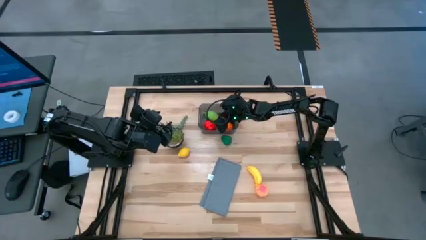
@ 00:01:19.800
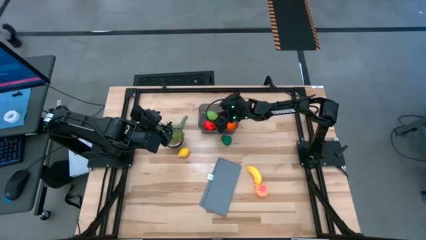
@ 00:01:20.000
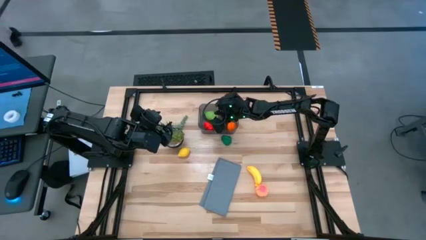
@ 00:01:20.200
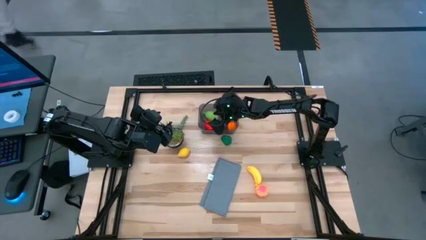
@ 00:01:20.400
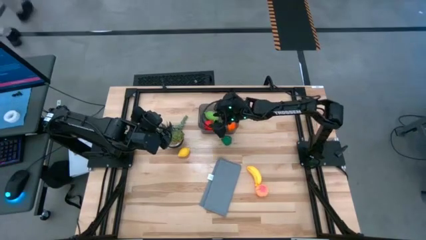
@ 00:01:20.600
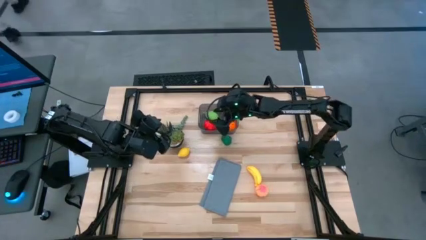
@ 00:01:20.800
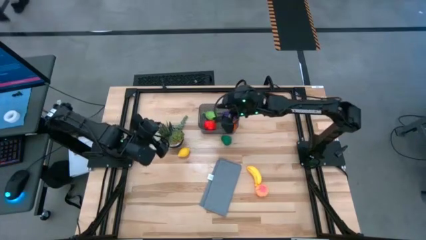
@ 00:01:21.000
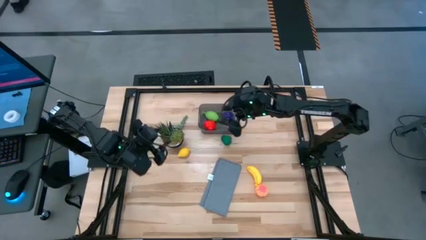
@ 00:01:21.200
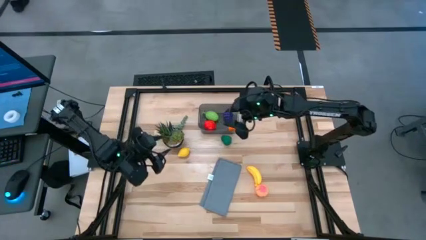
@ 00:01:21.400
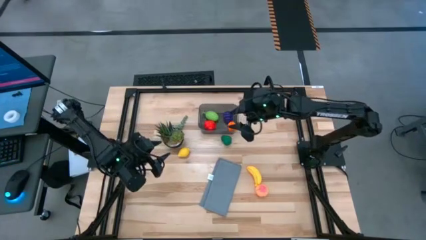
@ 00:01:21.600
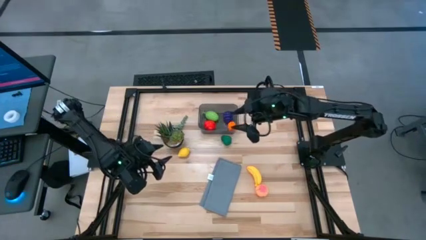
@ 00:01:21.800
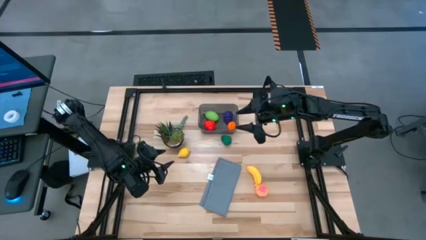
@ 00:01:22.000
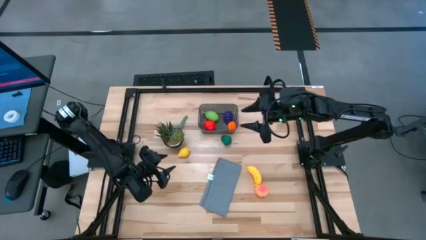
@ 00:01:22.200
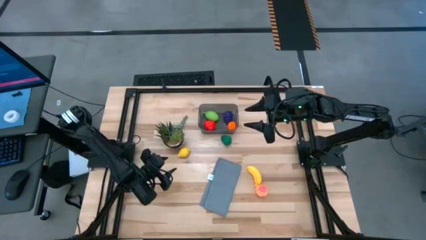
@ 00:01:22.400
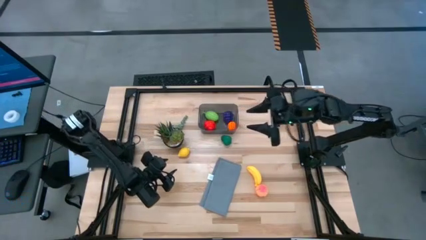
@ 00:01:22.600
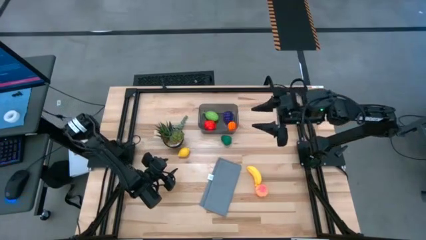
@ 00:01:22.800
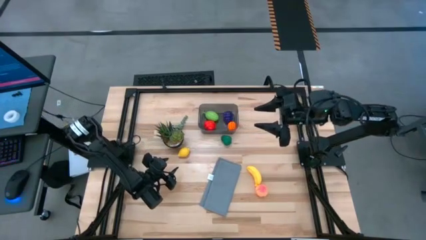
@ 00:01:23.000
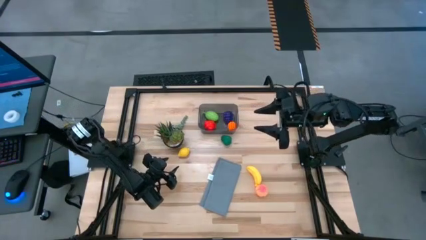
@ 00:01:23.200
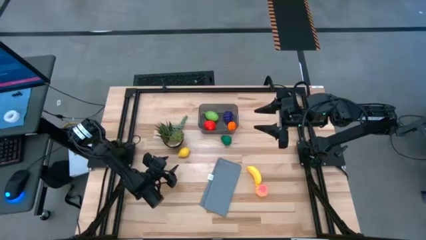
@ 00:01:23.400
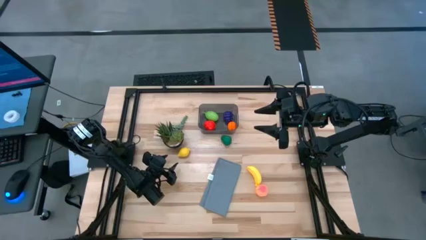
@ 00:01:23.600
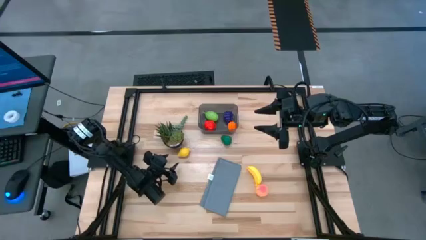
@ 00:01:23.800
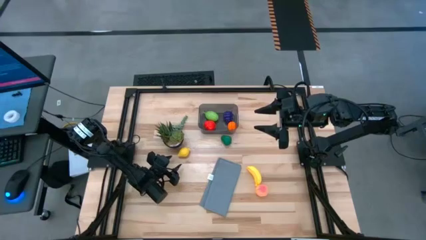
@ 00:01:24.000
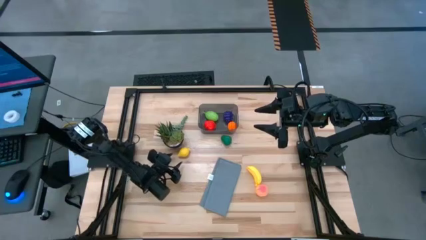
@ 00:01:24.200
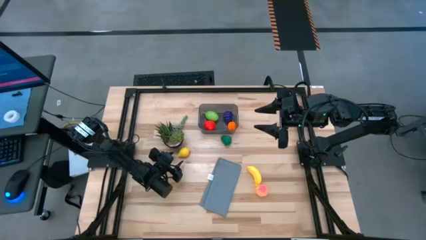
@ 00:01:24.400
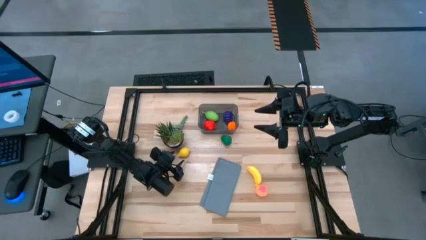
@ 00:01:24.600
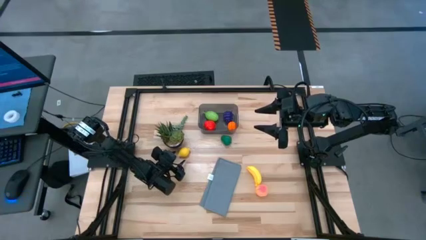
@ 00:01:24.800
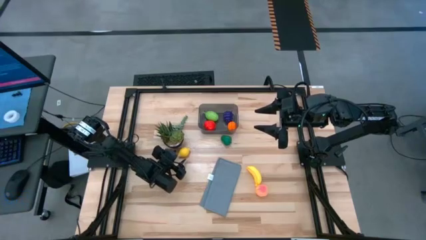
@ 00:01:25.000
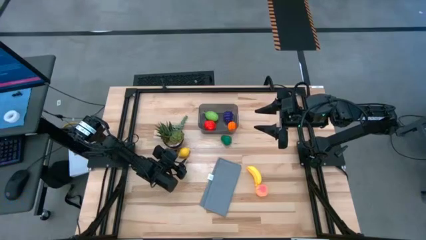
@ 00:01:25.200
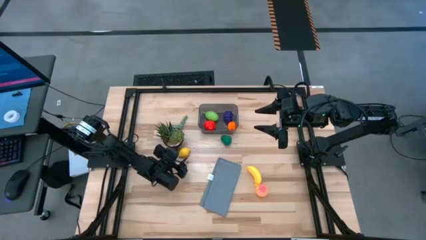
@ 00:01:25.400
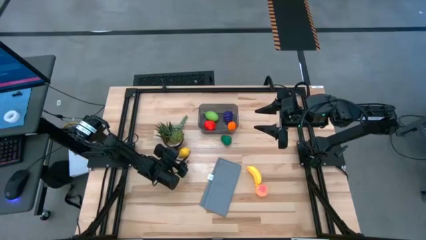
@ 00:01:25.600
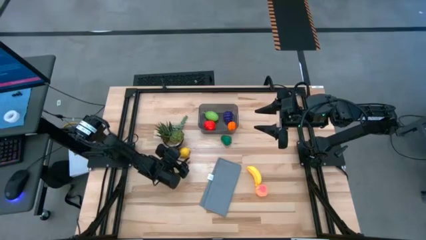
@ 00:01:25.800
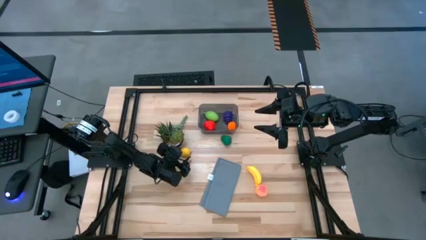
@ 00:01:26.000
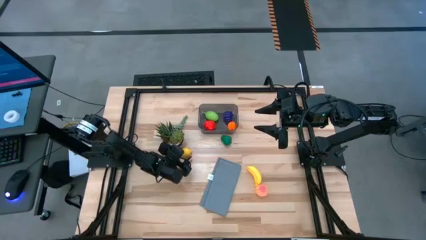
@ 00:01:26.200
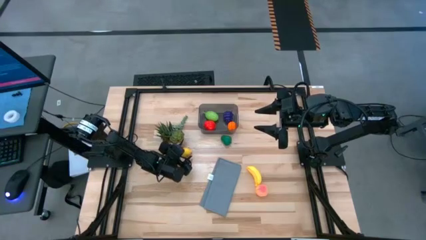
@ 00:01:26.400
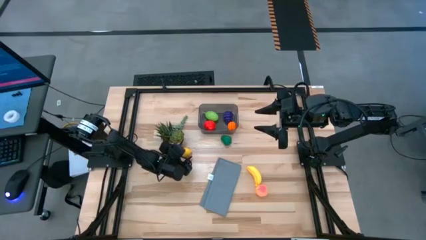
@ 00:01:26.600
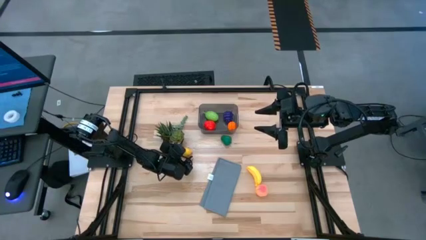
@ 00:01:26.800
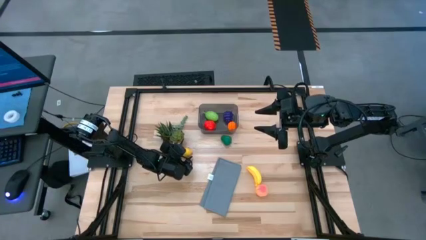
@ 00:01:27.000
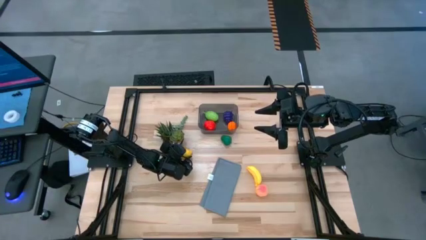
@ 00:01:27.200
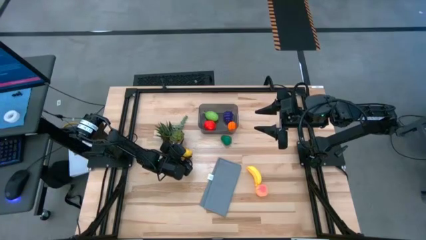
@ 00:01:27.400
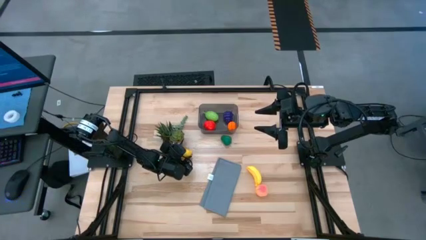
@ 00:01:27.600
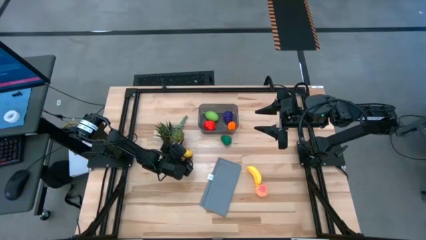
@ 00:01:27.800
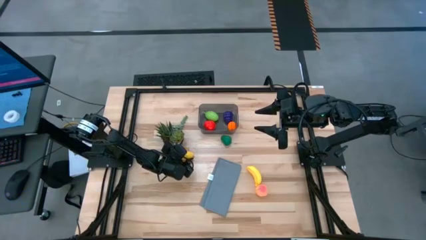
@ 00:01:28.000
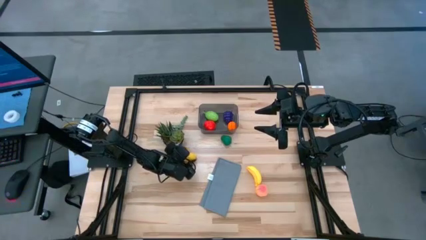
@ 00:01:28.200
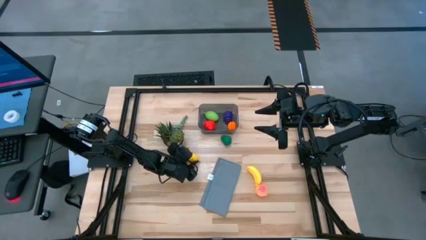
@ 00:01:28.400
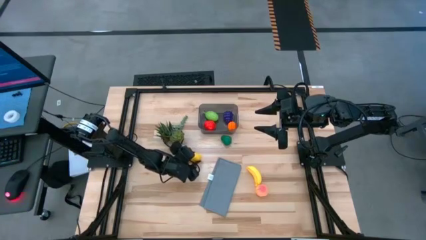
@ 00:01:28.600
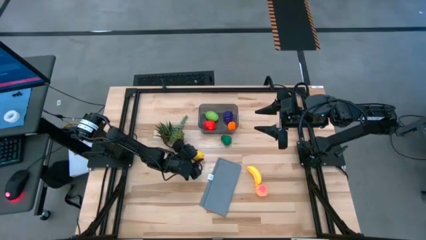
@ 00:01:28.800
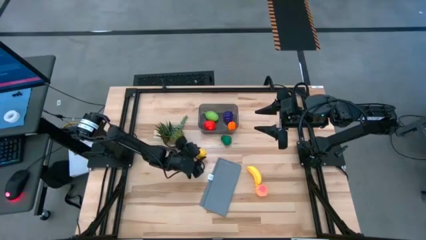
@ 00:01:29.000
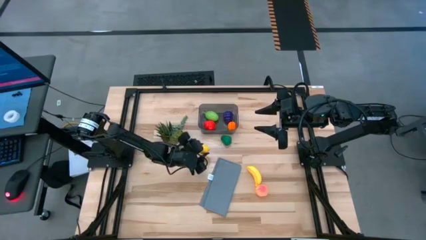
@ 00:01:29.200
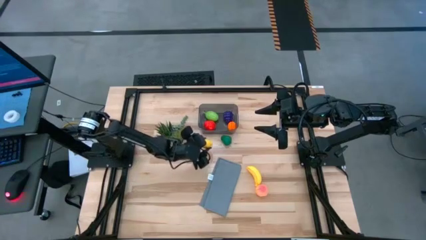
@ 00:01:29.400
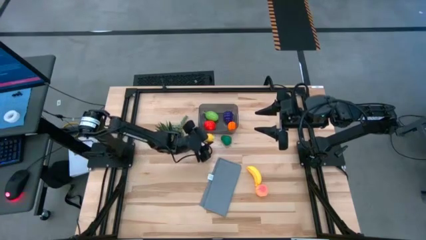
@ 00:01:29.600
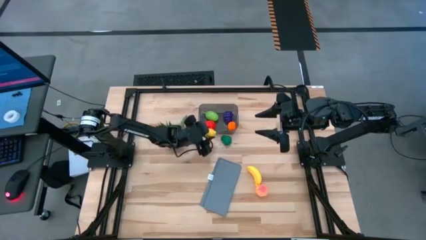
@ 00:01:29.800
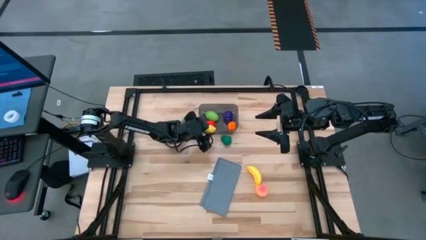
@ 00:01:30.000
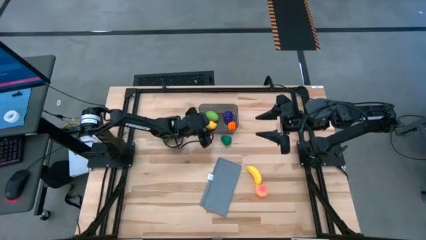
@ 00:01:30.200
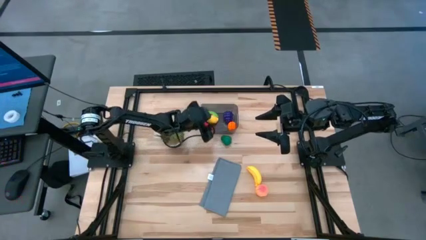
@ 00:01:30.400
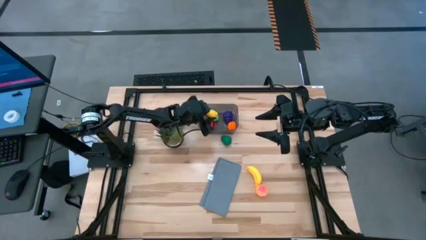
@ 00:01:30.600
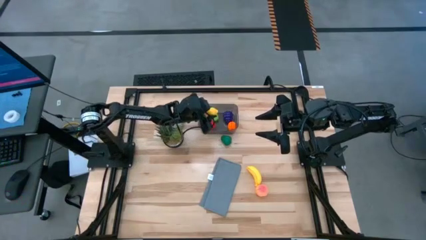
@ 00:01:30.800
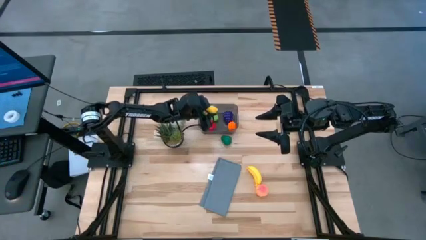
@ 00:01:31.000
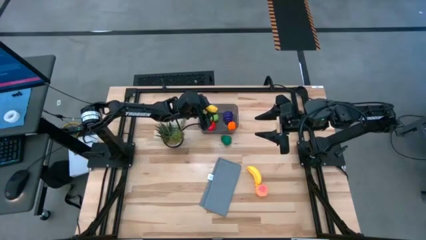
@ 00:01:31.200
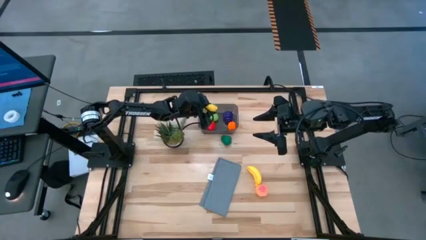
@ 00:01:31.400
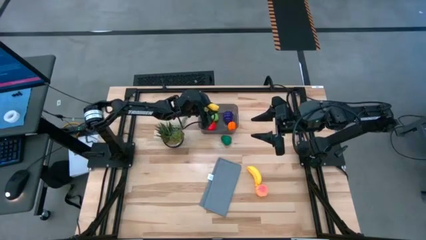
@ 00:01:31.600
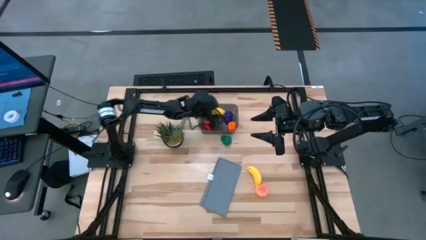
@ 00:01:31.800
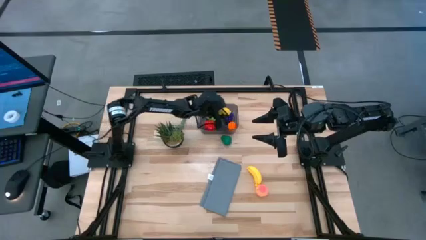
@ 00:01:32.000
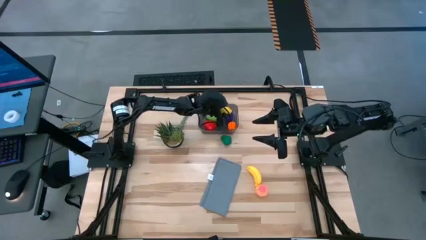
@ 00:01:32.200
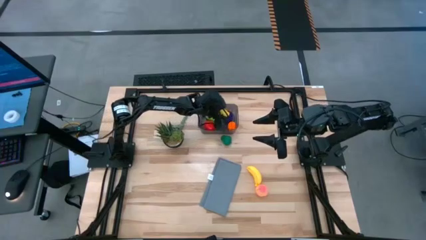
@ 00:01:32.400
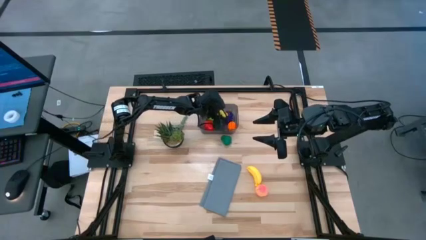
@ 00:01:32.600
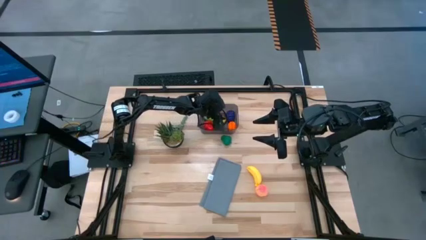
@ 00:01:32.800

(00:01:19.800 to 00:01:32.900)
Task: Pick and placing Produce into tupperware
Put the lemon into the black bin

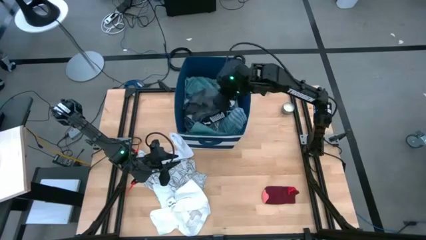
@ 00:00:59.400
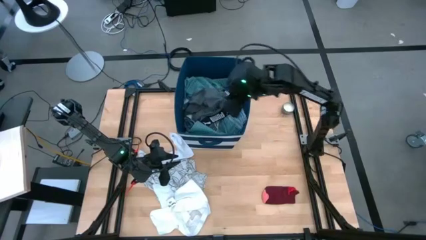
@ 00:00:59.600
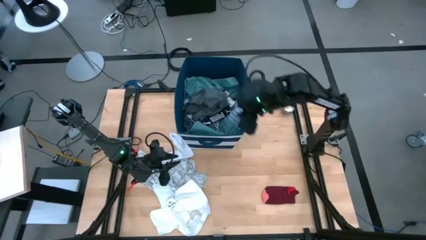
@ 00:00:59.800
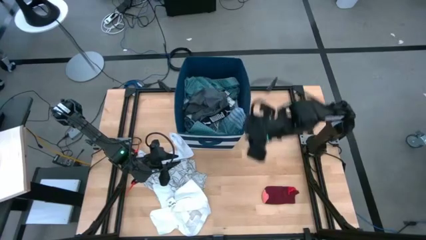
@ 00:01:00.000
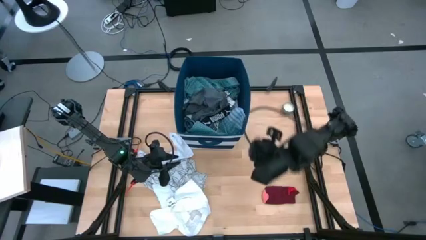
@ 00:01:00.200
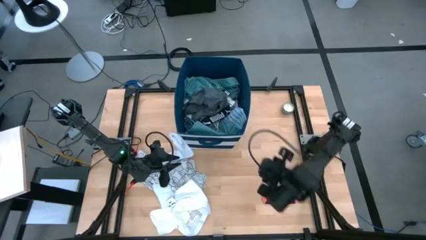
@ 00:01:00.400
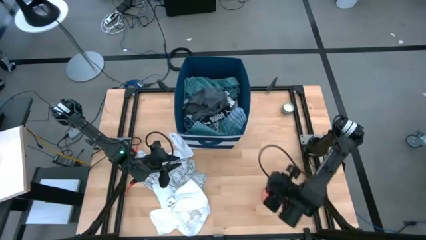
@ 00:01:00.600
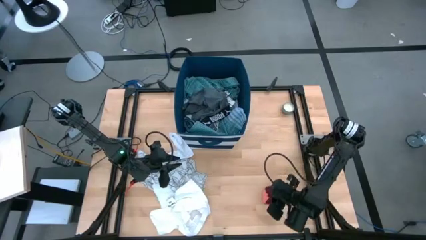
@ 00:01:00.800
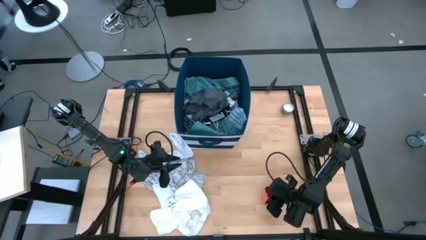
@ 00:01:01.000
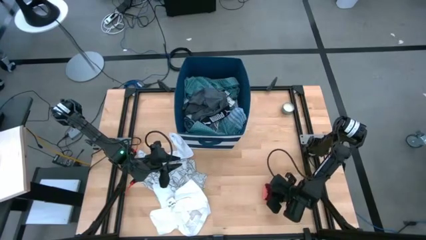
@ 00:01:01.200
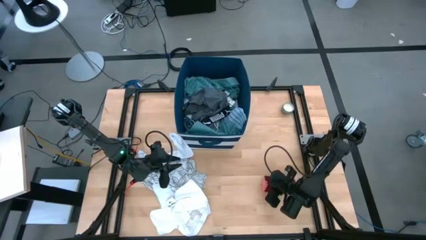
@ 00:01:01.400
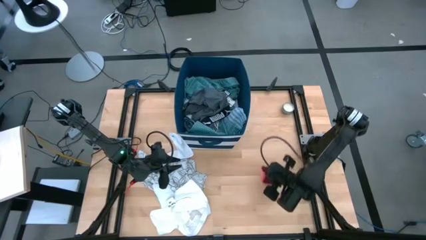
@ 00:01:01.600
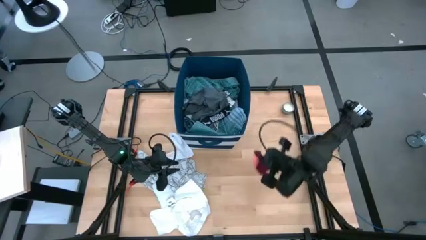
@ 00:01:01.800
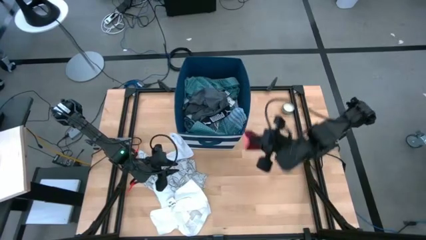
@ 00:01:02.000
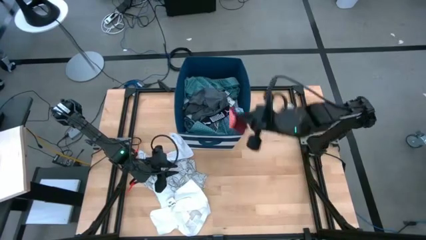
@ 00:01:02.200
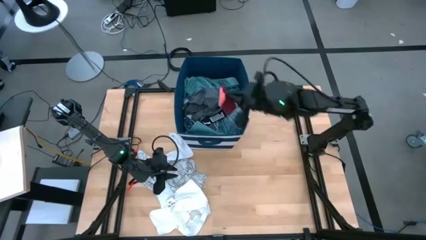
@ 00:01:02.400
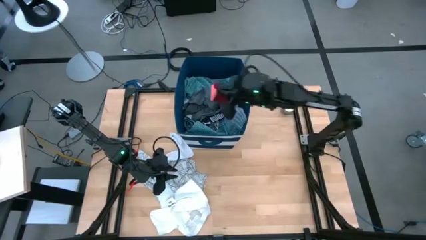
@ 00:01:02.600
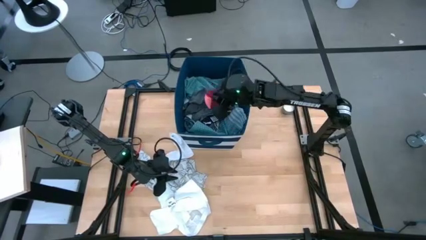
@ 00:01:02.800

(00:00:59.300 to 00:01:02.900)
Task: Sort clothes
Put the red sock into the blue bin
